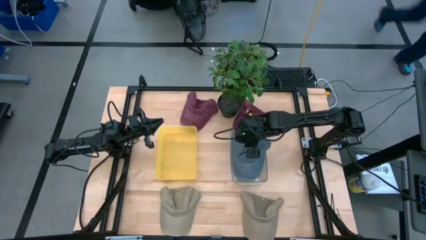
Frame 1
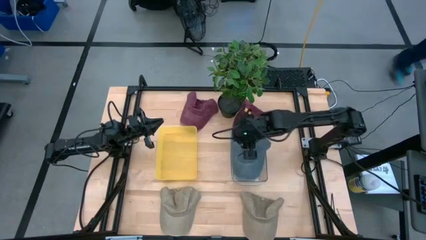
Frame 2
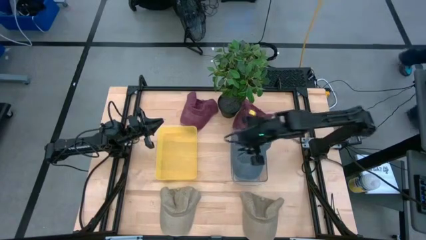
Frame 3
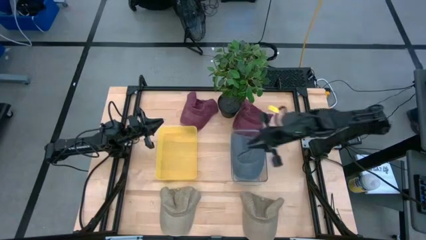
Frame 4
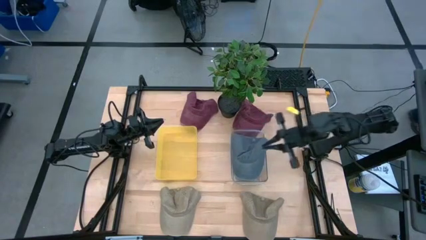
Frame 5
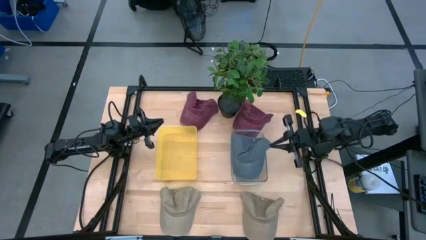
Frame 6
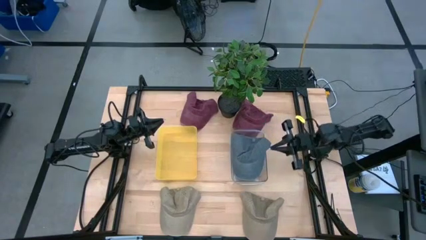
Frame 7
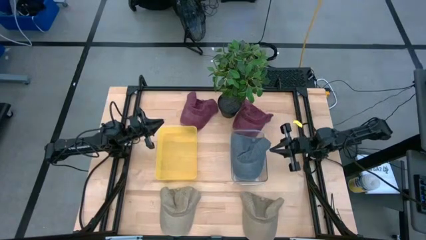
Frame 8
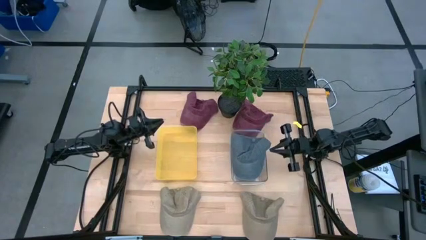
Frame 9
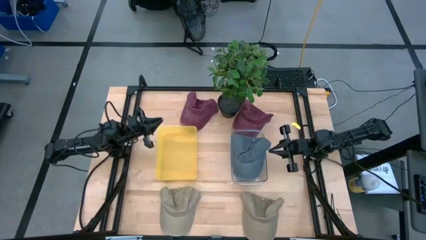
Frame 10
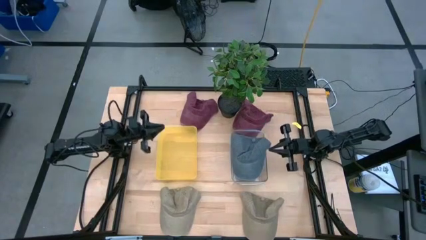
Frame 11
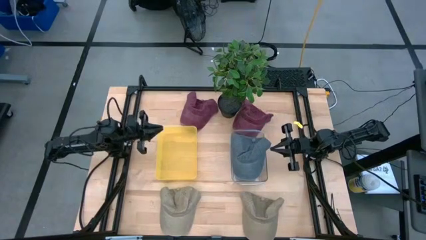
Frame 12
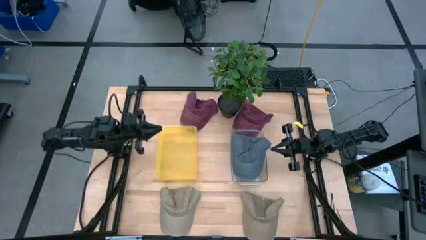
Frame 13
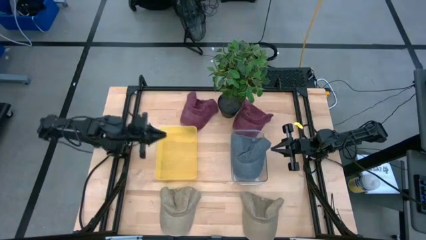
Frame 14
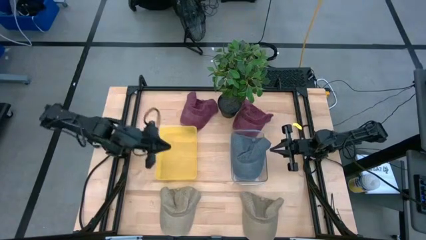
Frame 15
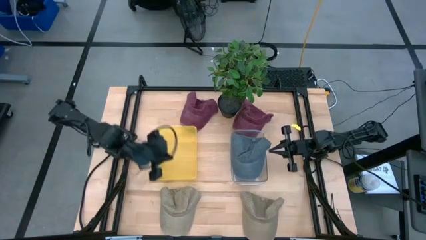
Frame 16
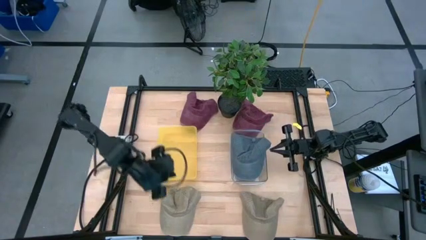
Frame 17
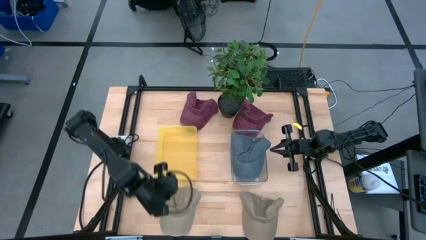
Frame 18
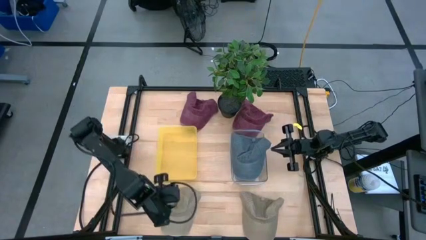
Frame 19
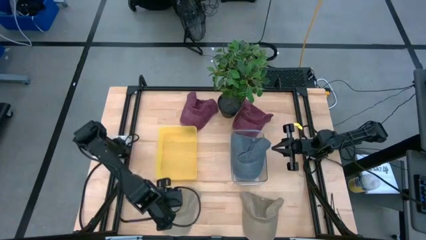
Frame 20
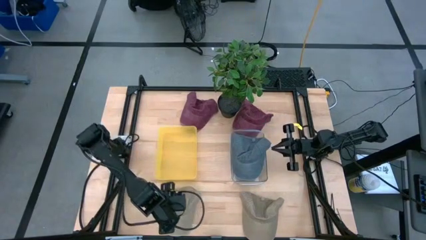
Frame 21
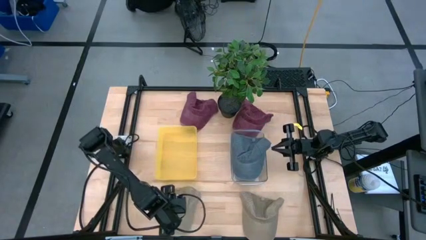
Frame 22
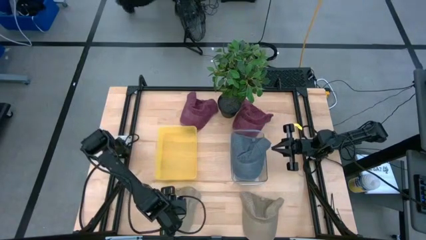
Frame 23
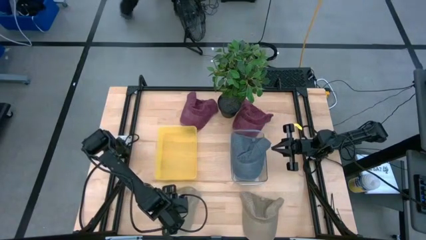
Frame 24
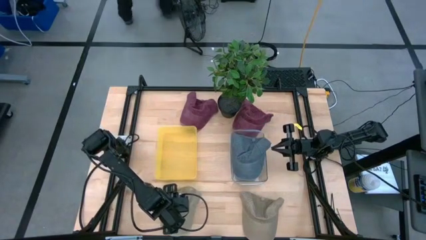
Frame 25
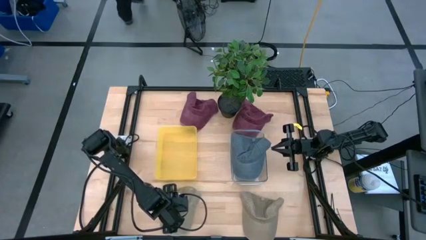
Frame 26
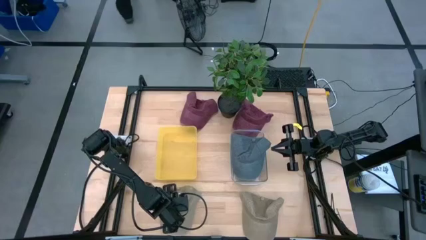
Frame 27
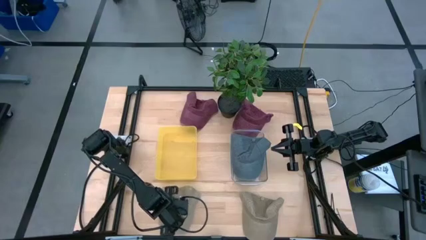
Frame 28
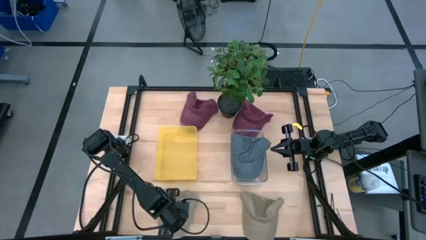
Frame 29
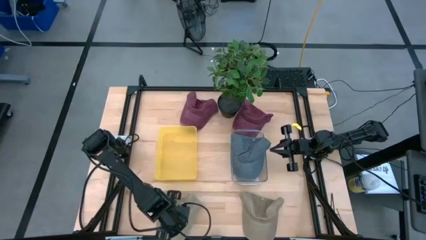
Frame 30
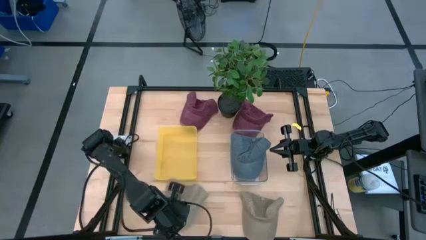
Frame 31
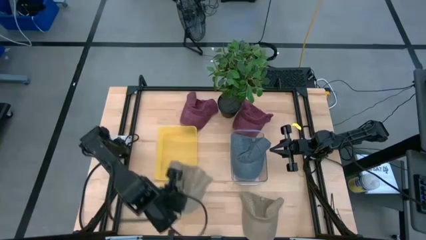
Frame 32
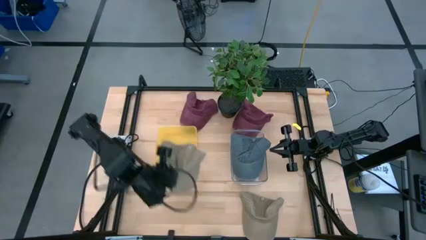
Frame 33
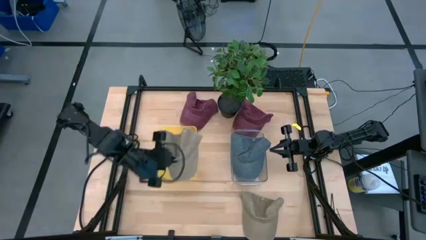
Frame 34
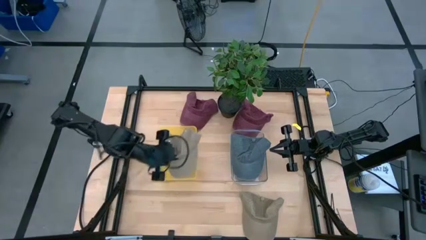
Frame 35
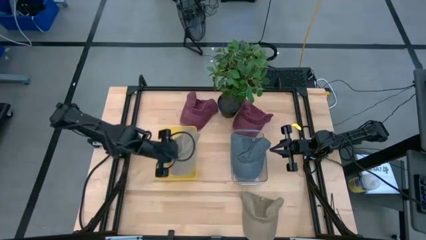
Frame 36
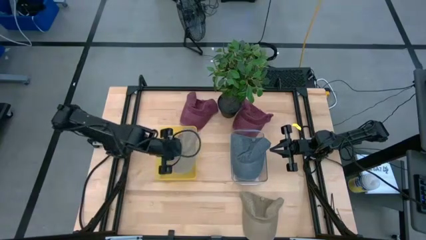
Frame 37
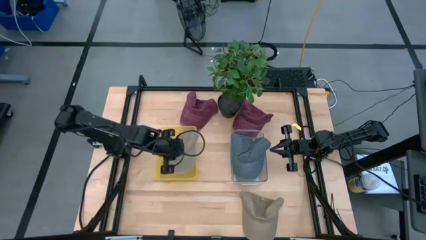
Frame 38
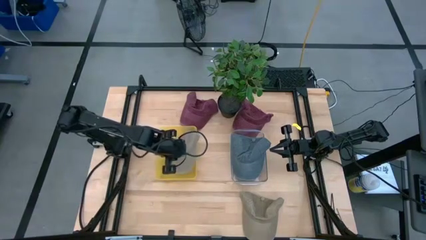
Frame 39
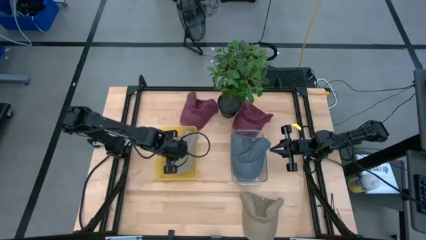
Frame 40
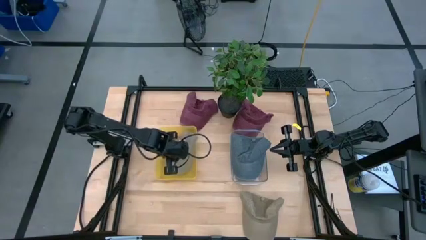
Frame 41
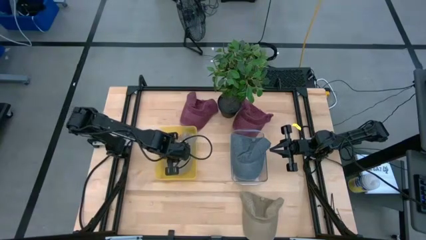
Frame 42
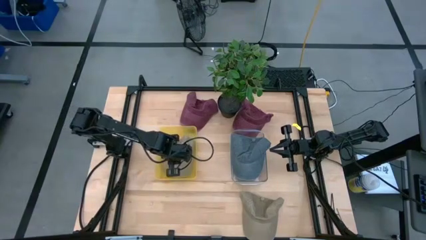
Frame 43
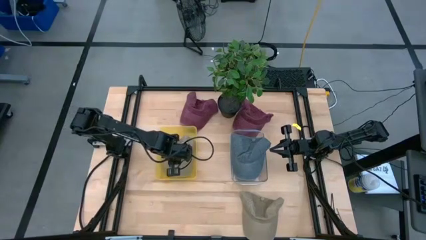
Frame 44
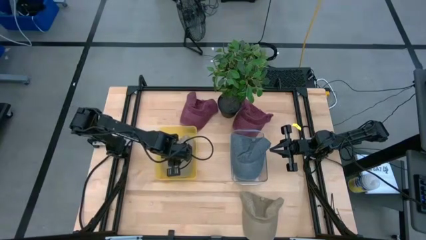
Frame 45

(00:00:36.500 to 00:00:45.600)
Task: Pick & Place hat
Put the left brown cap into the yellow bin

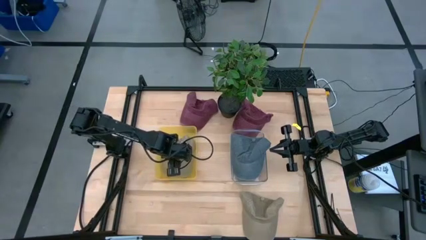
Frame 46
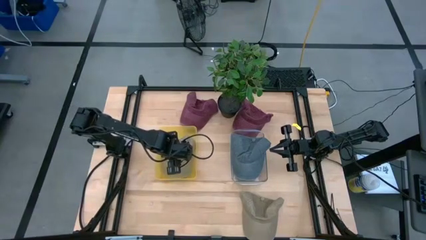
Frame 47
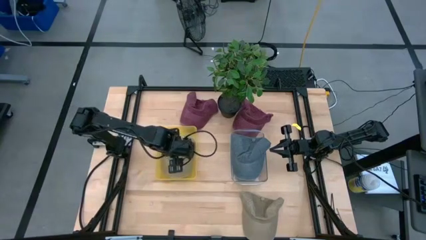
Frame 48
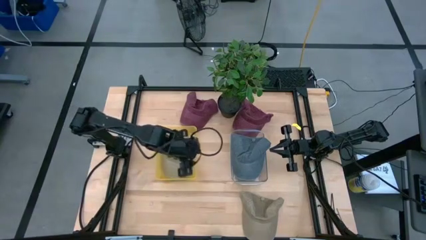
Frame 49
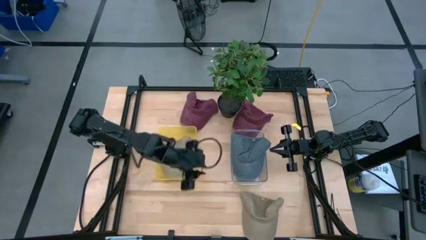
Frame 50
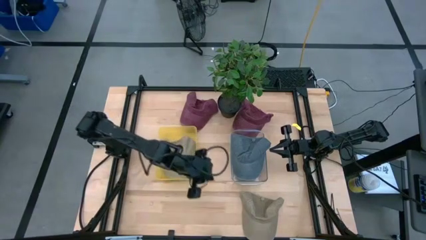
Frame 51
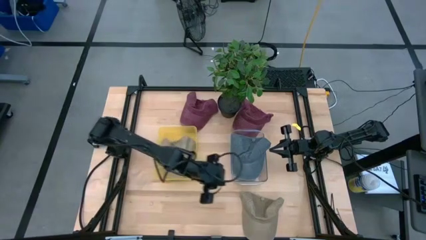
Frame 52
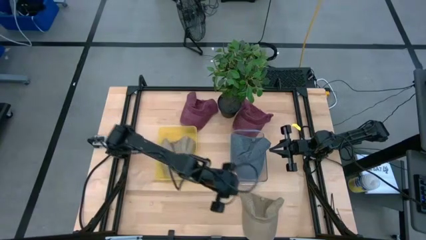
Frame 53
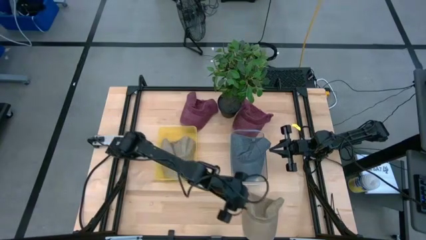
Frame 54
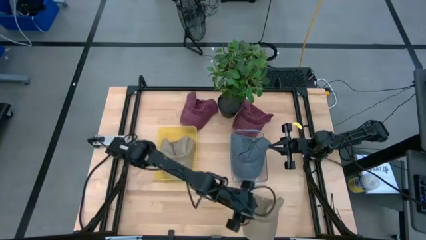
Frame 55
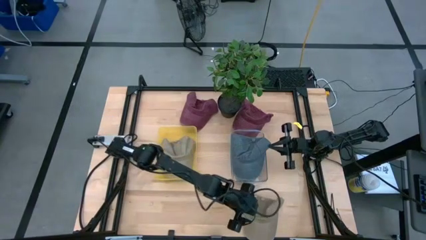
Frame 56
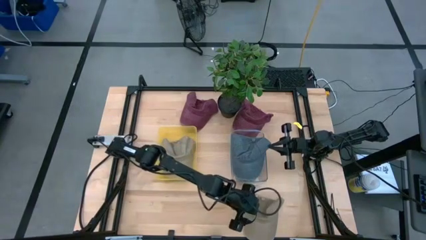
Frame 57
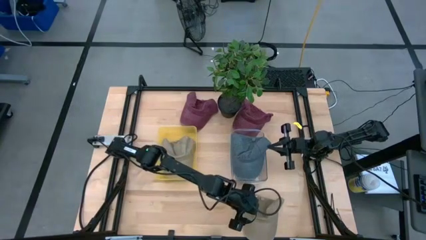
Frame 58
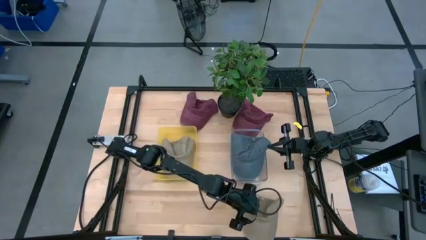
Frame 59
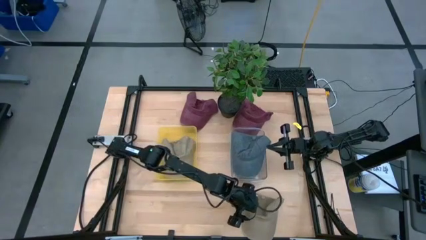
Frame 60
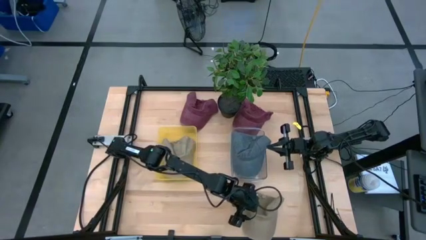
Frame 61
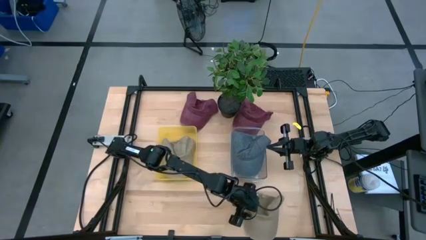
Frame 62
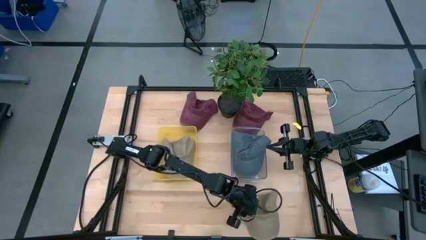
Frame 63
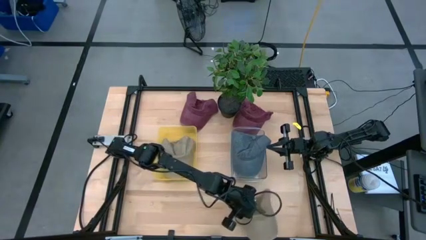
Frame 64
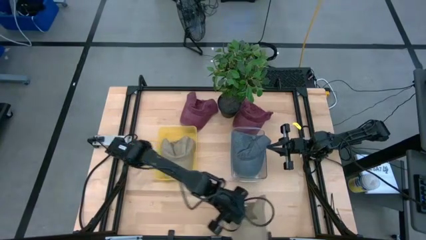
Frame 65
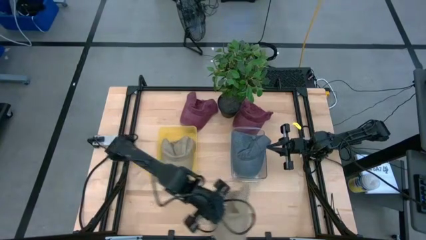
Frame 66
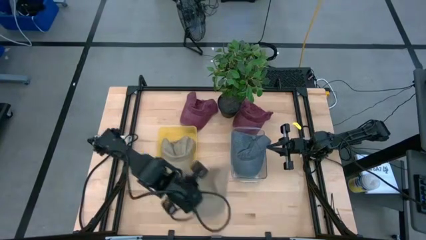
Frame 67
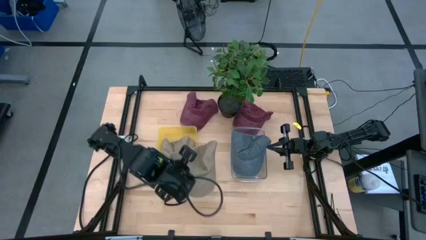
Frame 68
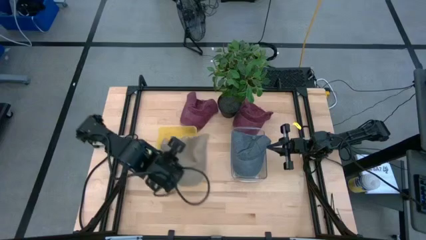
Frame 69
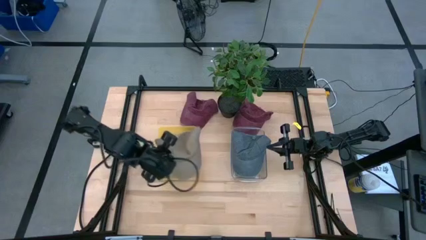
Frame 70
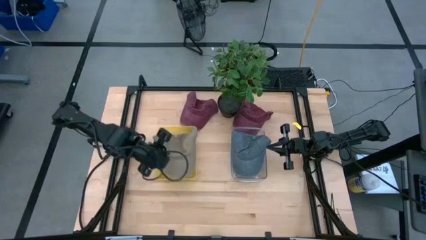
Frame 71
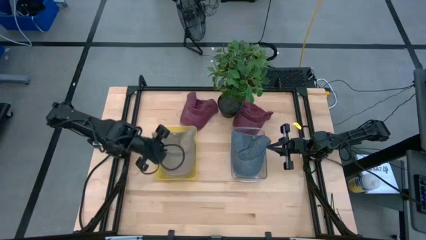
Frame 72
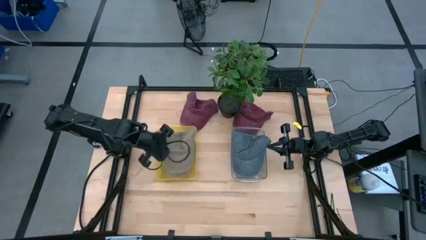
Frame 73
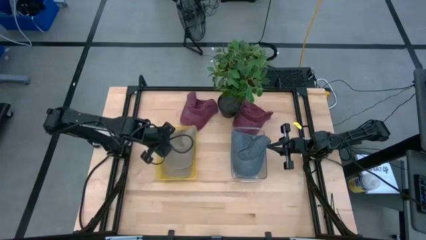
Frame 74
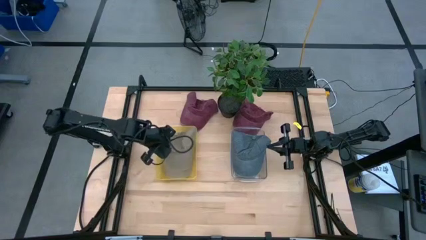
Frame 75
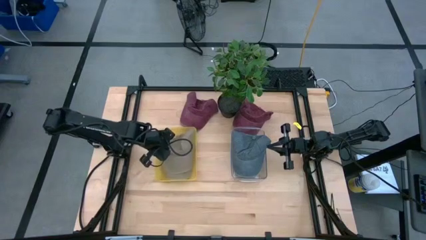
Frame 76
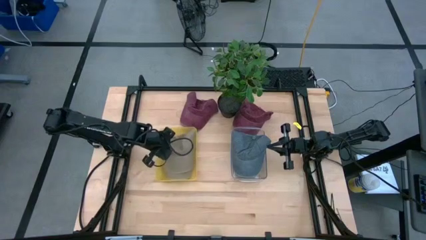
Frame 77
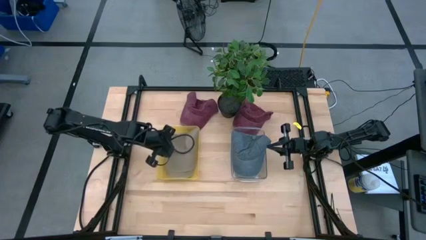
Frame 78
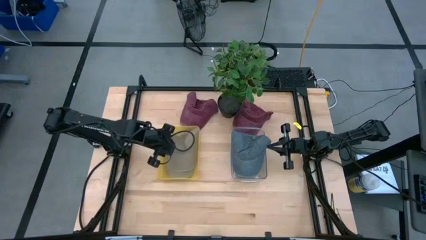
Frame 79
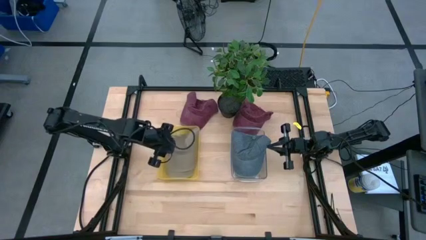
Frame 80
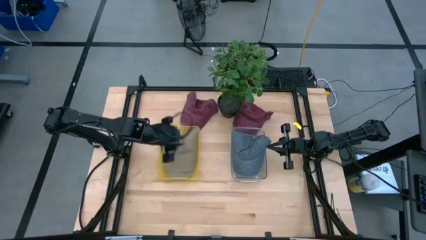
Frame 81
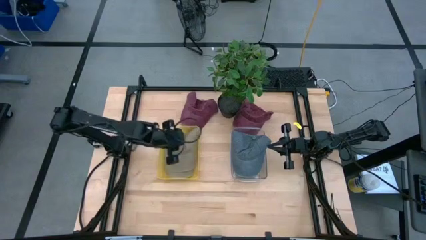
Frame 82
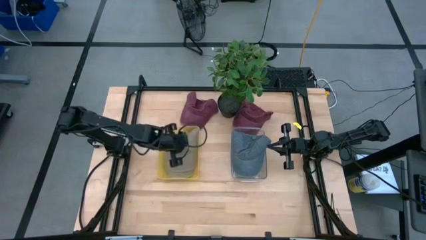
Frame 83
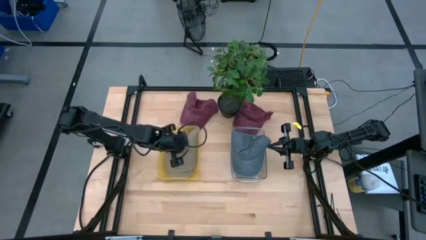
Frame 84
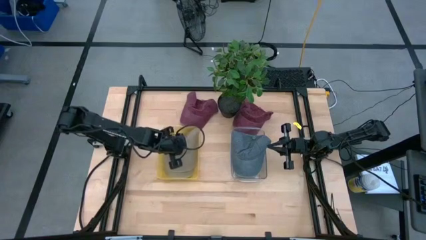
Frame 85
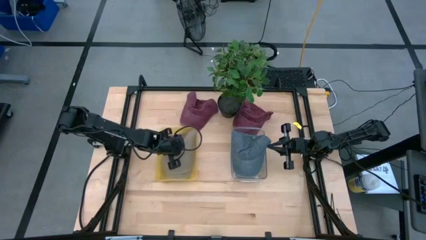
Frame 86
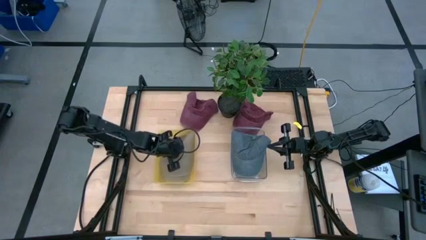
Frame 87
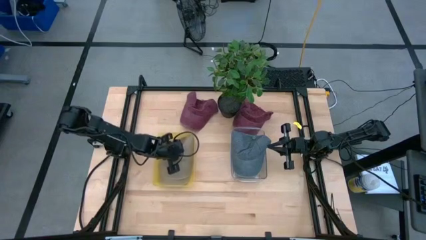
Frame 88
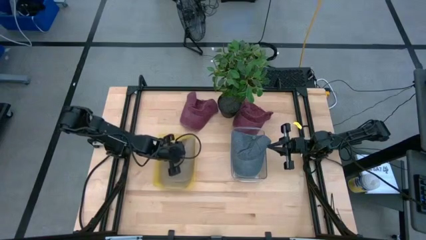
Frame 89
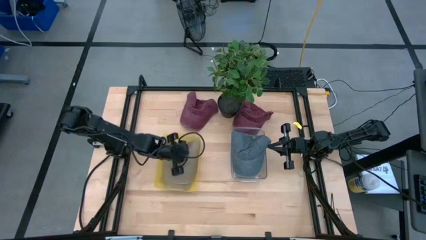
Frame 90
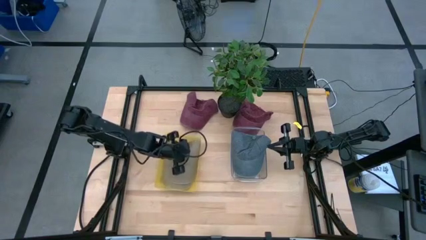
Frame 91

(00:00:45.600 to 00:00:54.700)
Put the brown cap into the yellow bin
